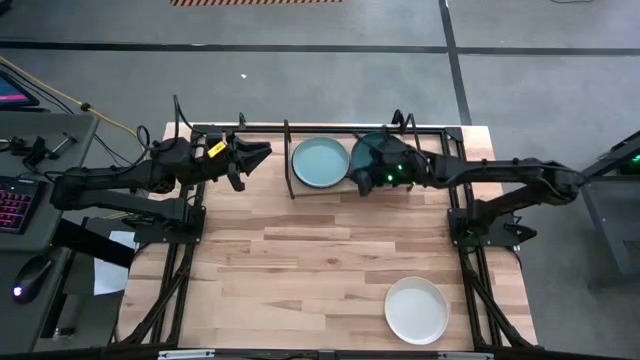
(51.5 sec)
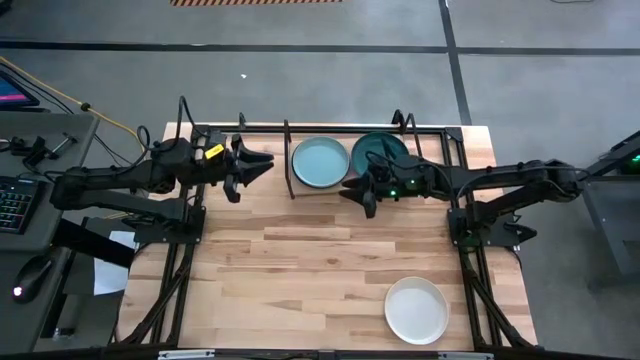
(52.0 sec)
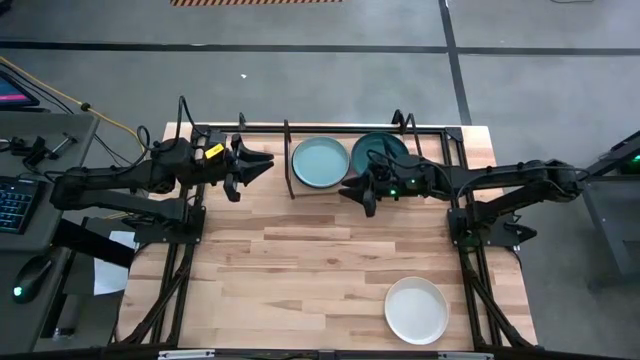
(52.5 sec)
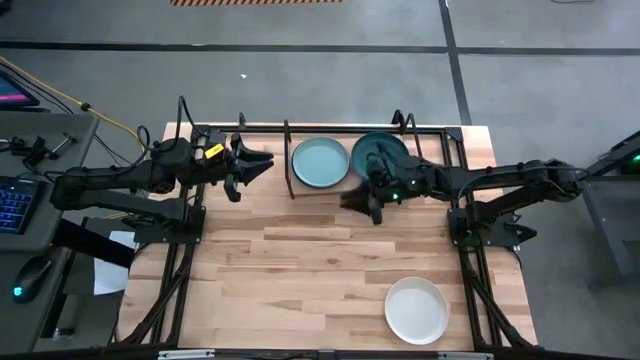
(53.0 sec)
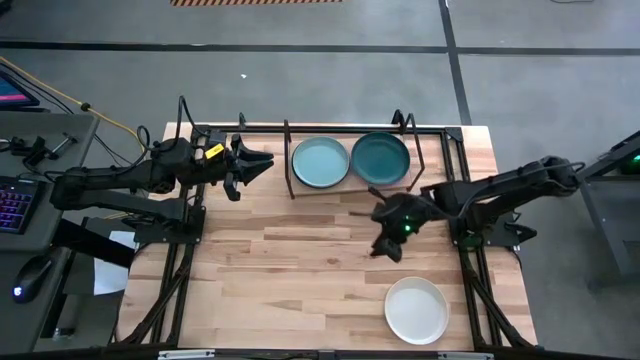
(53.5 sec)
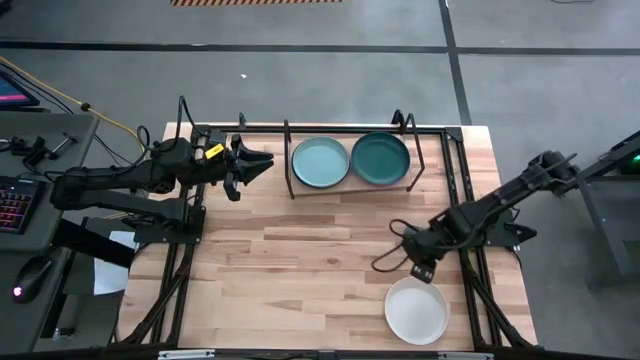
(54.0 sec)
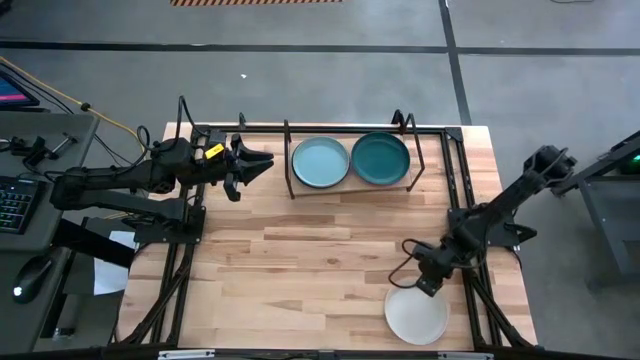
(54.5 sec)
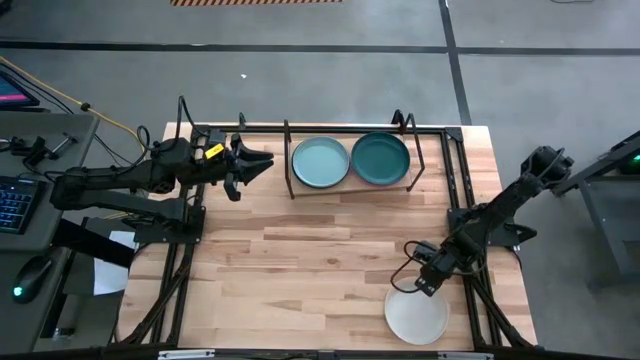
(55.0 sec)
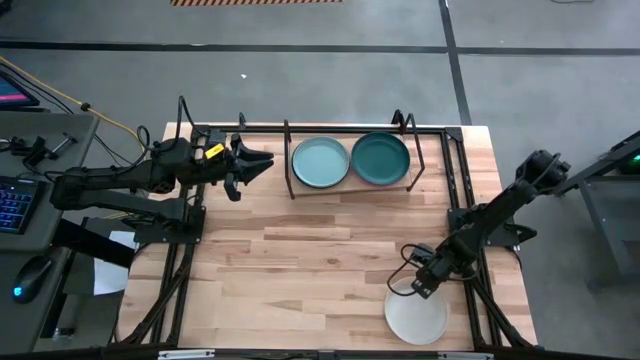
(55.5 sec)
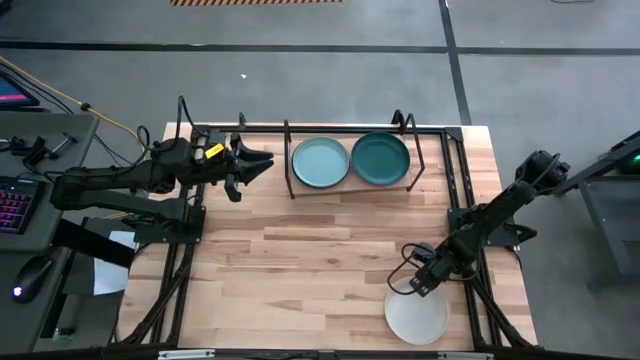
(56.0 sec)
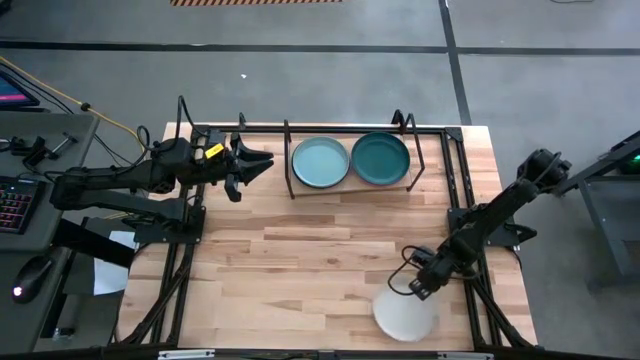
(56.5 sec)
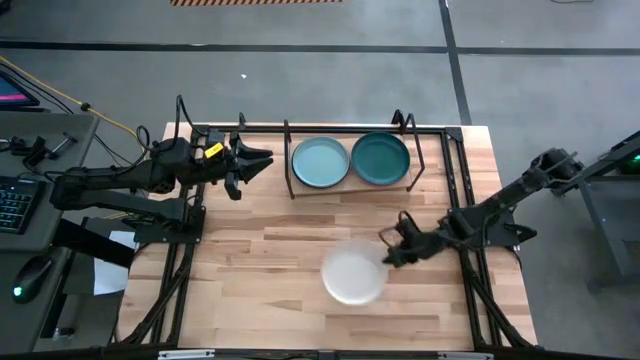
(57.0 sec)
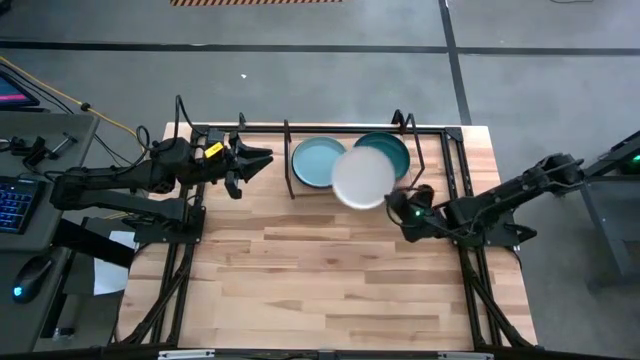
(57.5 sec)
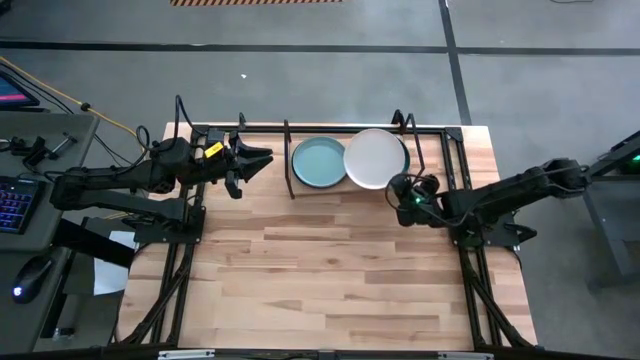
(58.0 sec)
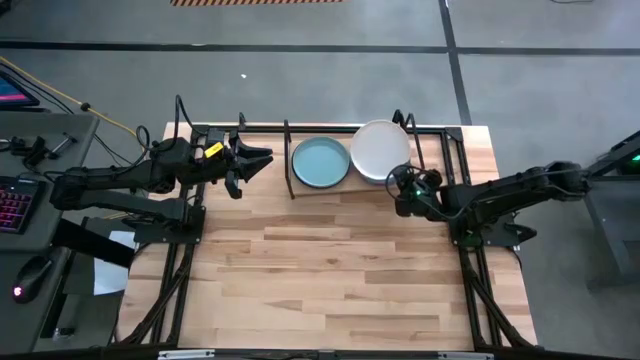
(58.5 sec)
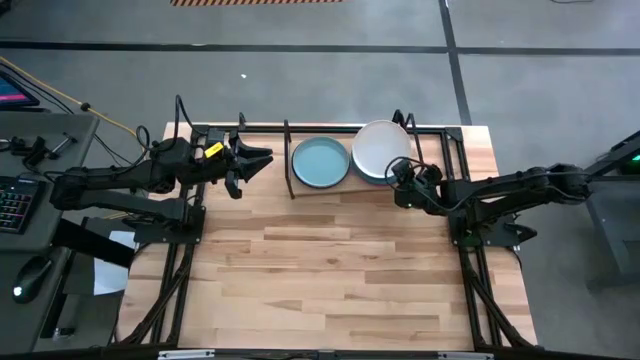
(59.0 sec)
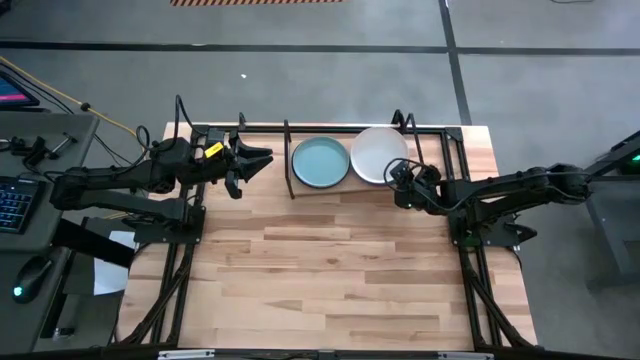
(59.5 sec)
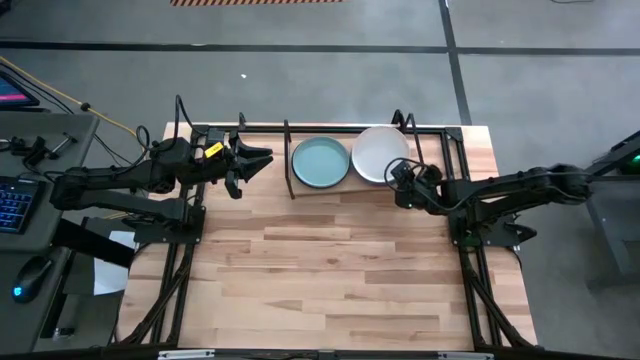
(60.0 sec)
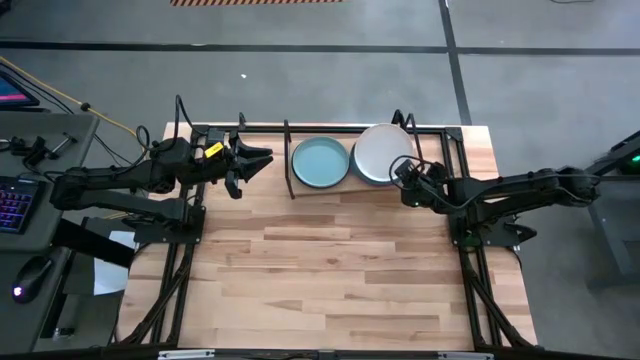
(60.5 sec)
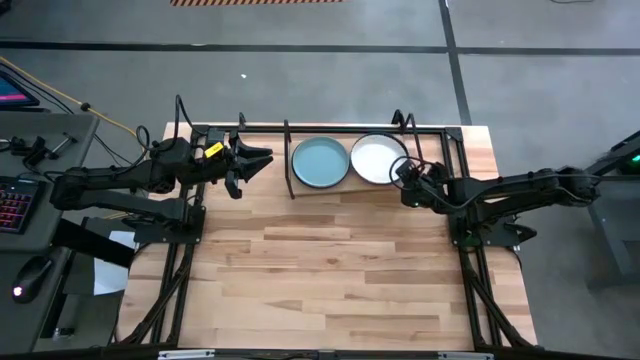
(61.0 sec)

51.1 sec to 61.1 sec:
Task: Place and stack plates onto a shelf
Stack the white plate on top of the green plate on the shelf

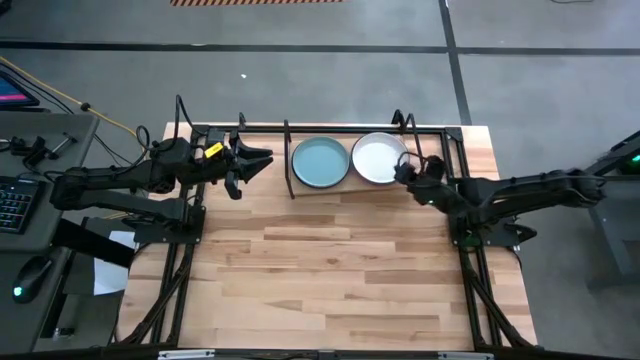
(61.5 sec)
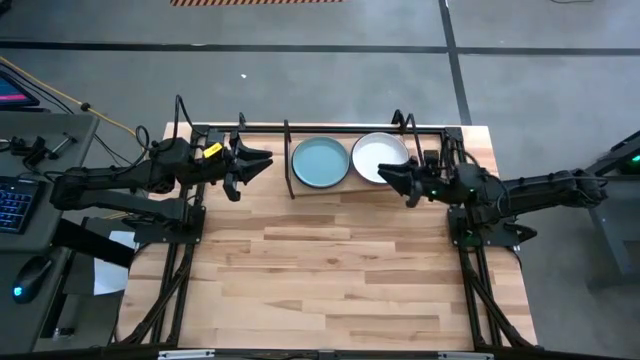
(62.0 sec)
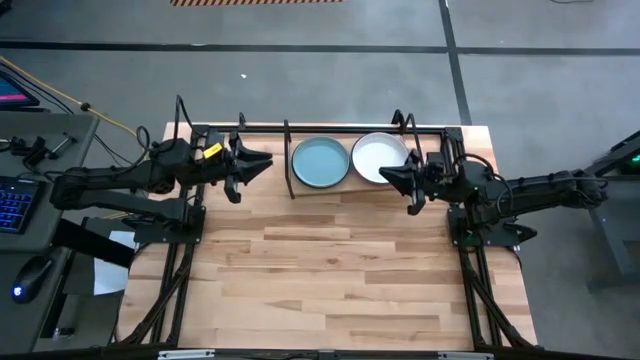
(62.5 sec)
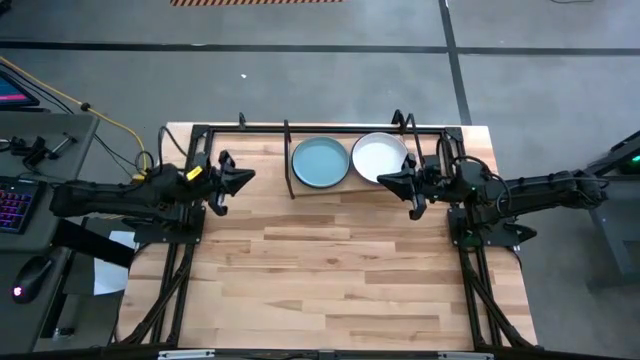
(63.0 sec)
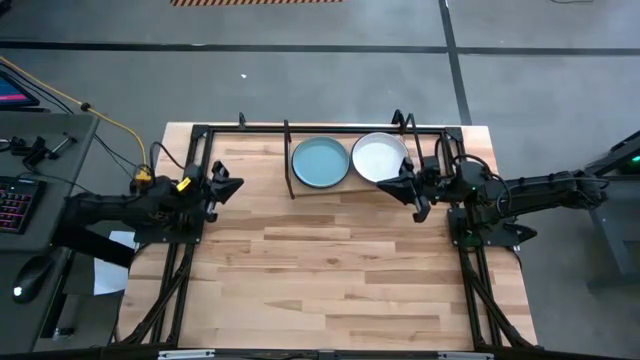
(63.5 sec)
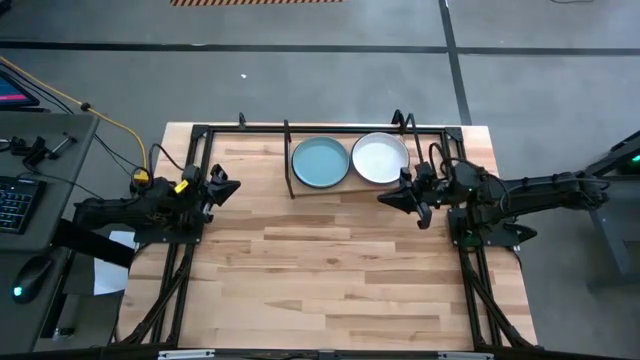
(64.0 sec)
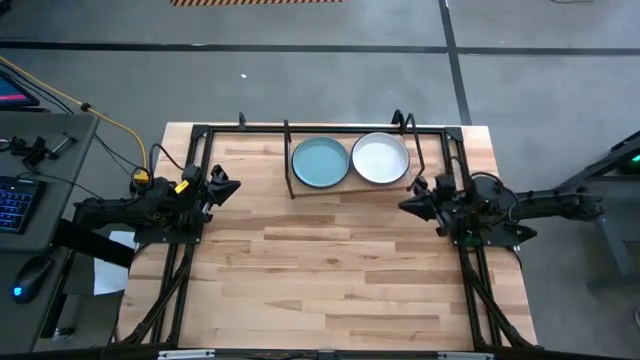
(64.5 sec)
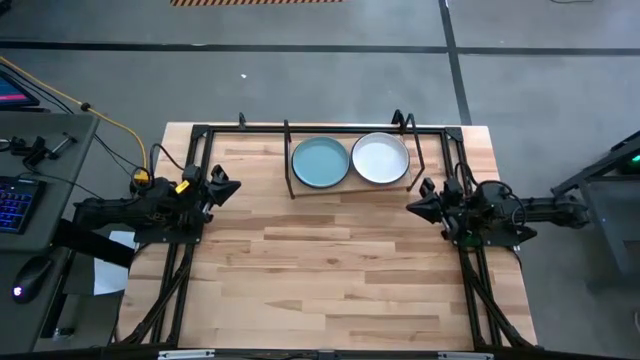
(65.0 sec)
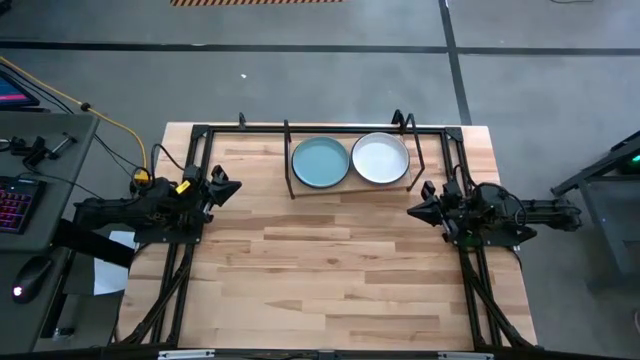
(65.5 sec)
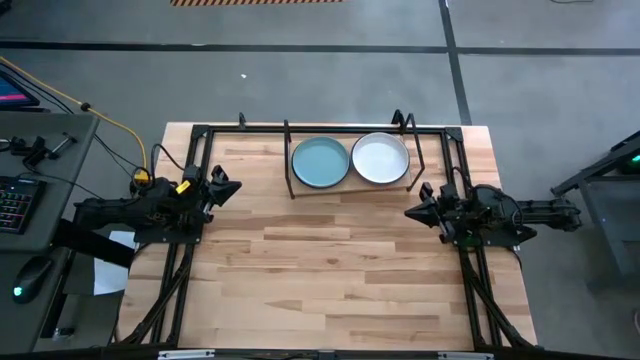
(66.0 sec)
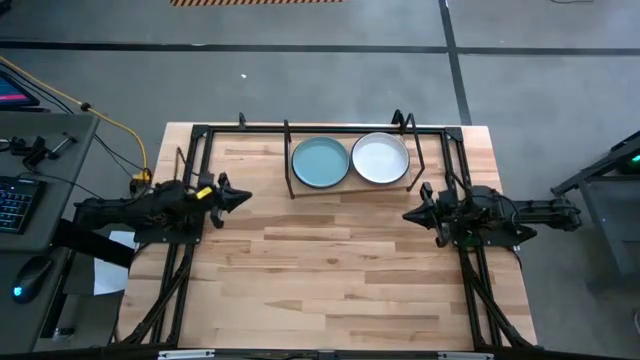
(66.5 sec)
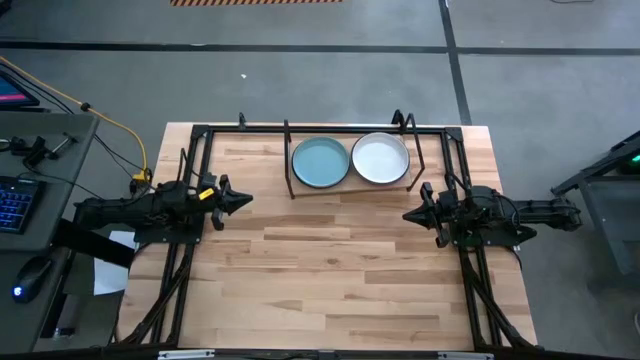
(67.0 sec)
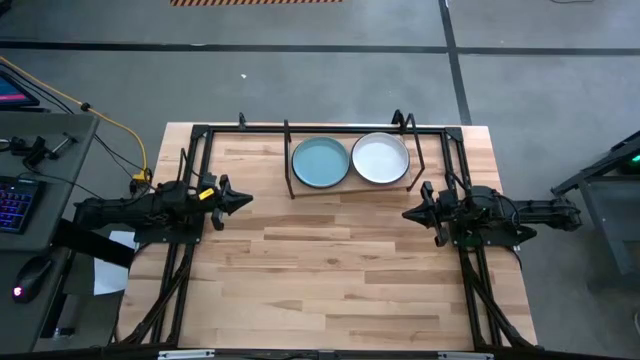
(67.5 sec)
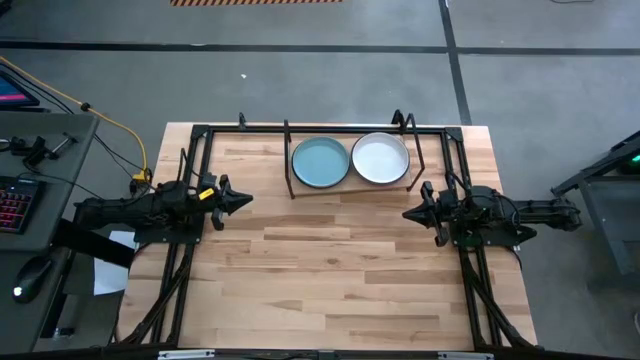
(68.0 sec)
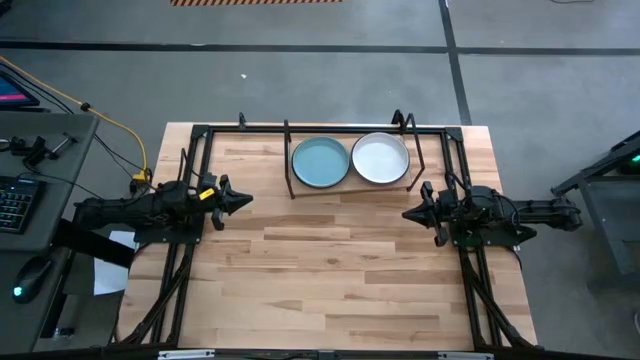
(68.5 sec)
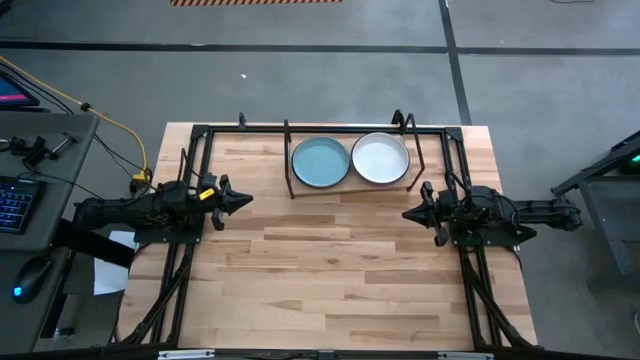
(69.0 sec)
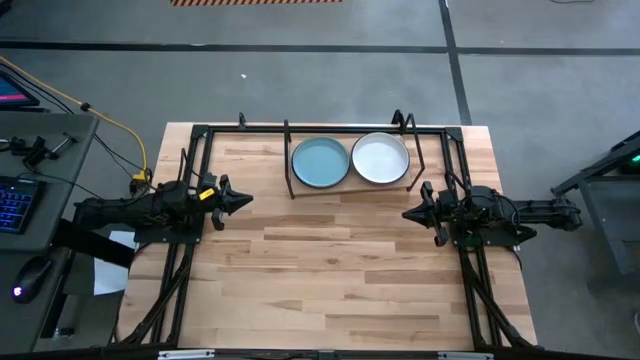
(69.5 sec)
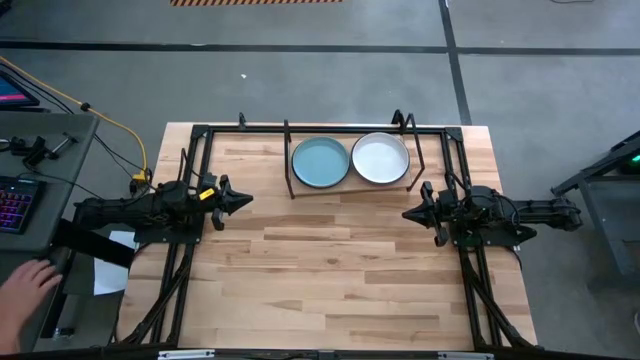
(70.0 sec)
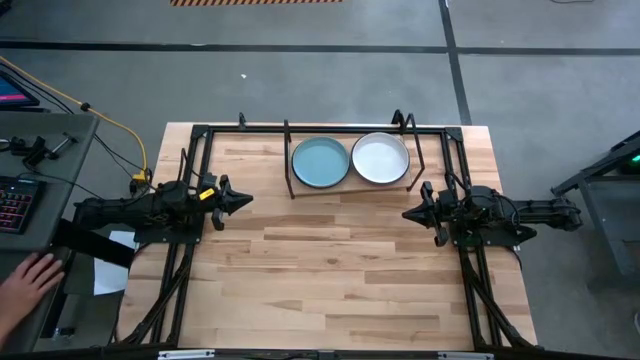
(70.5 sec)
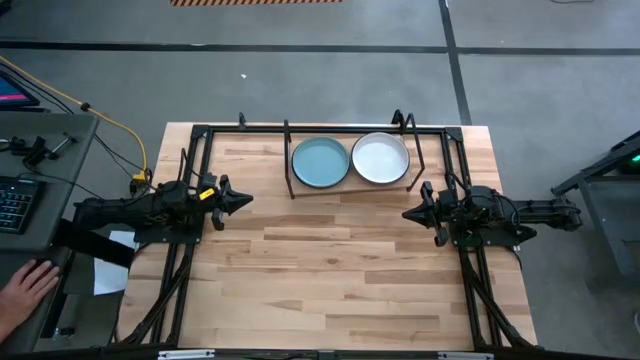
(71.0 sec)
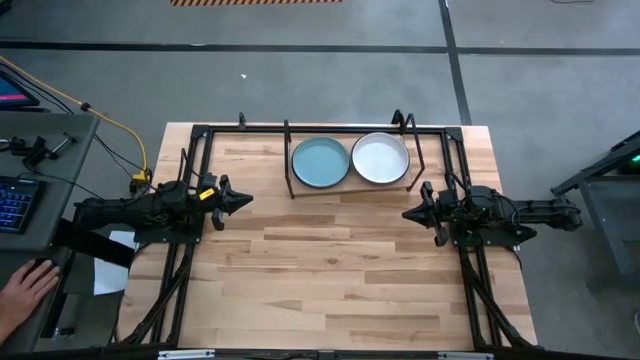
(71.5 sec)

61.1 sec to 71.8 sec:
Return to Home Position
